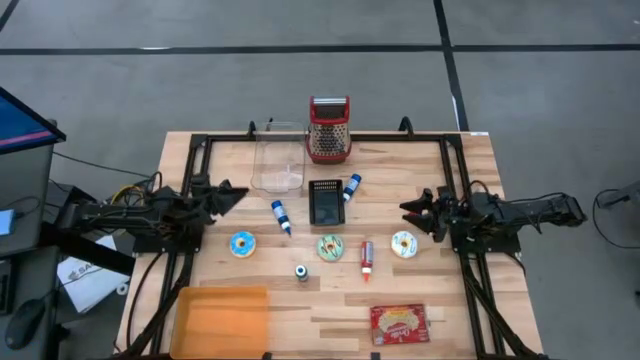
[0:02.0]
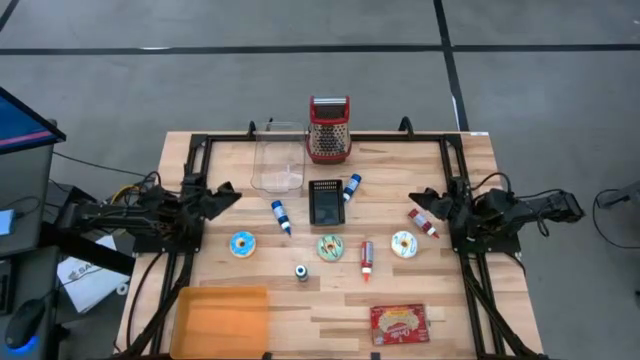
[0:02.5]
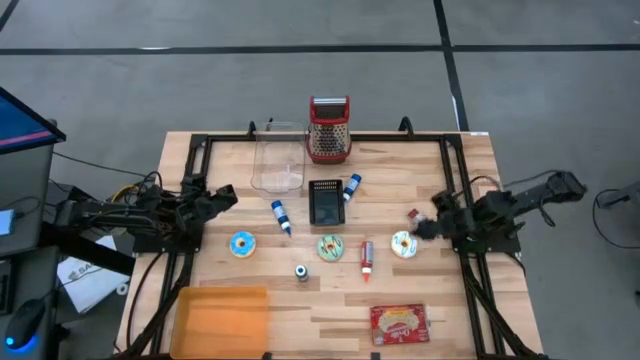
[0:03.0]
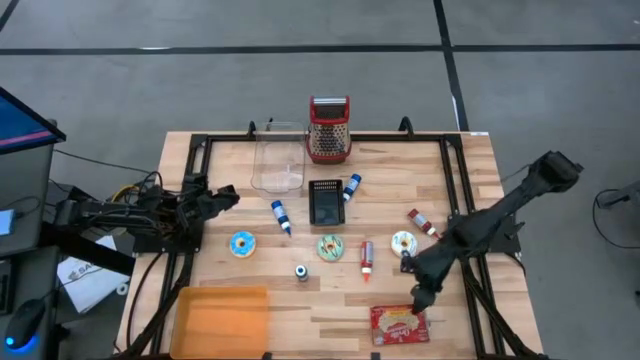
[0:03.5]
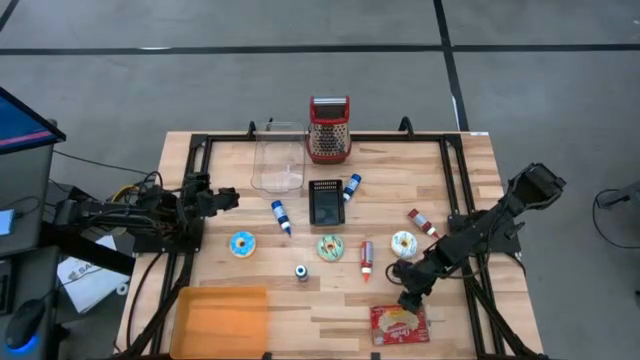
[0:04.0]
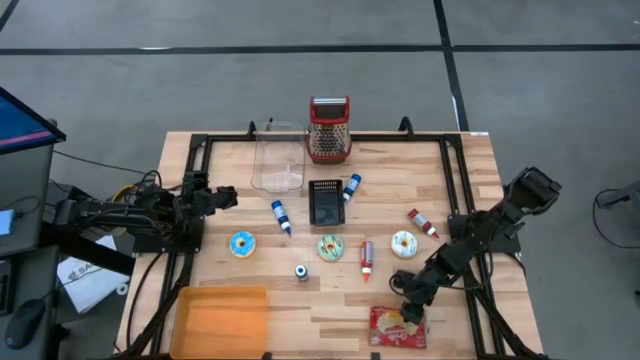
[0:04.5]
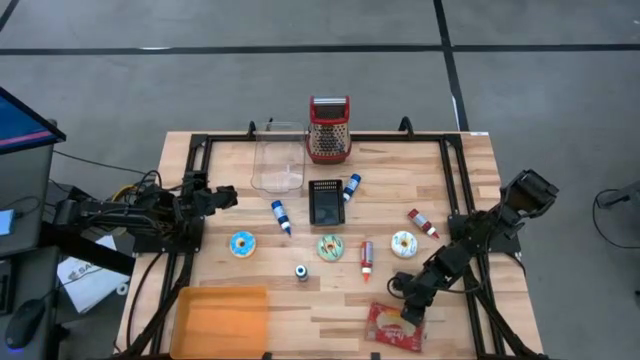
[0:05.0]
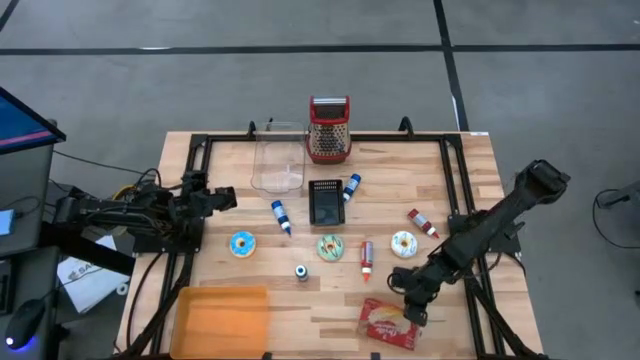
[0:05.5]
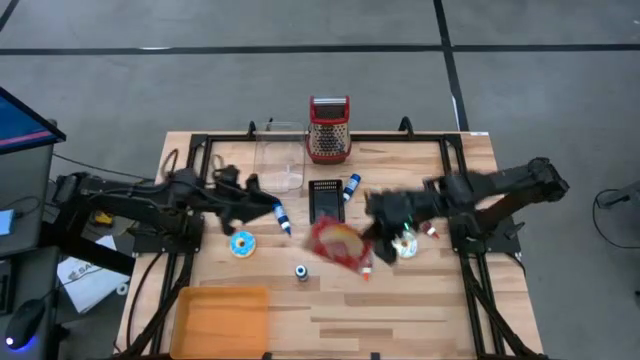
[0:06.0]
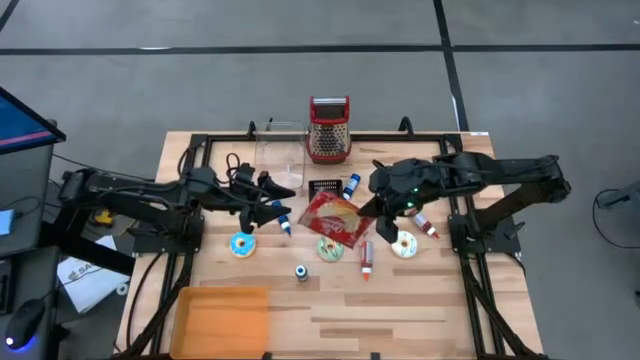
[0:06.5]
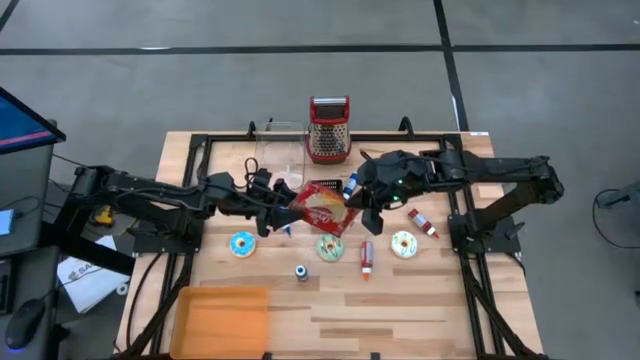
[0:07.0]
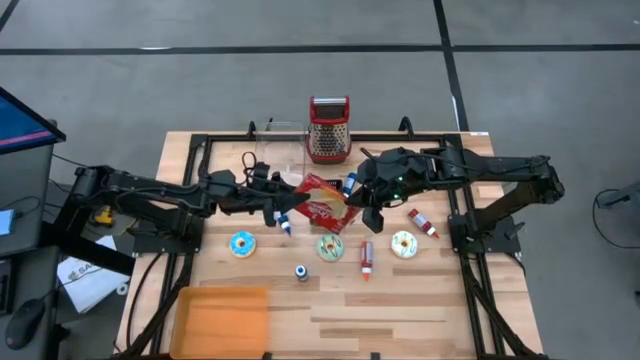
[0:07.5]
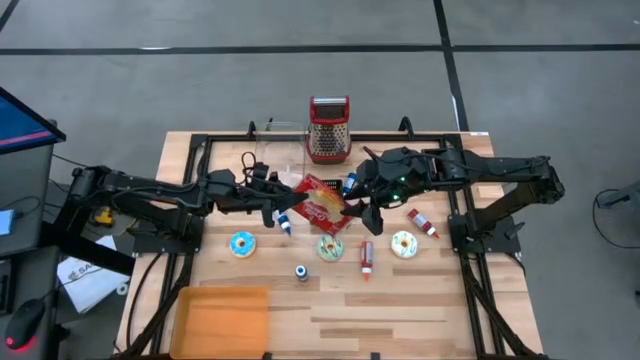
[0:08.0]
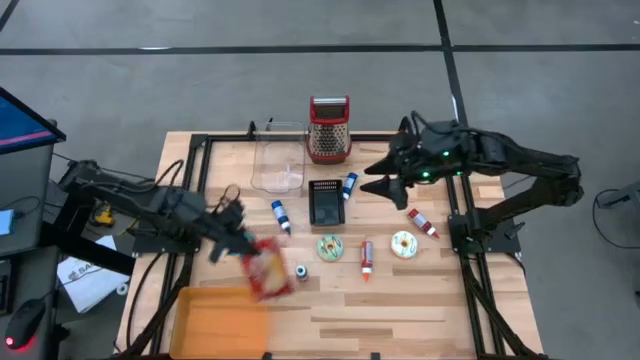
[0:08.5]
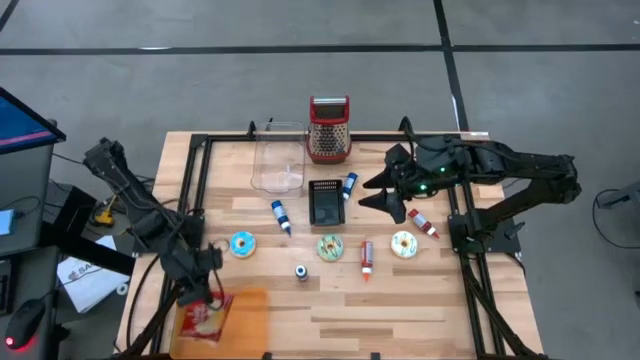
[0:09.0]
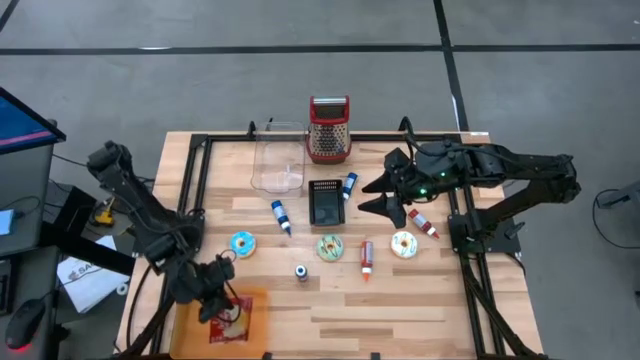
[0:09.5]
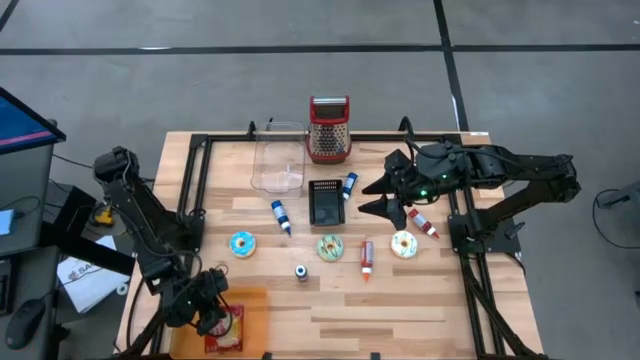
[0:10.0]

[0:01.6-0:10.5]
Put the popcorn bag into the orange bin

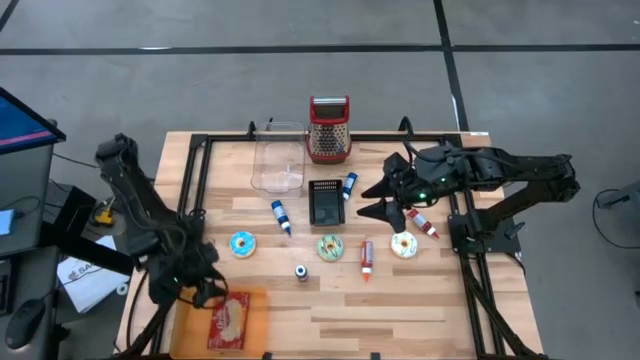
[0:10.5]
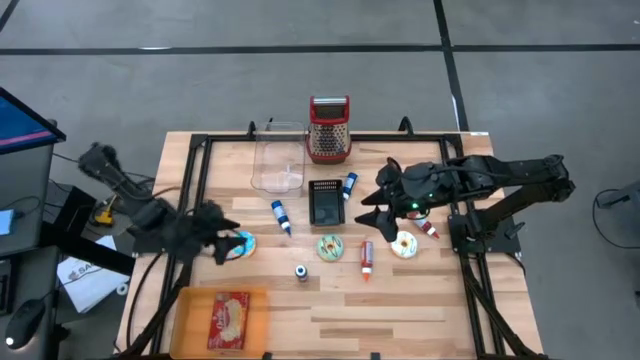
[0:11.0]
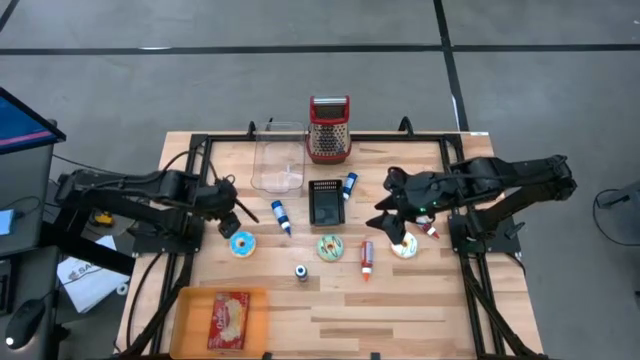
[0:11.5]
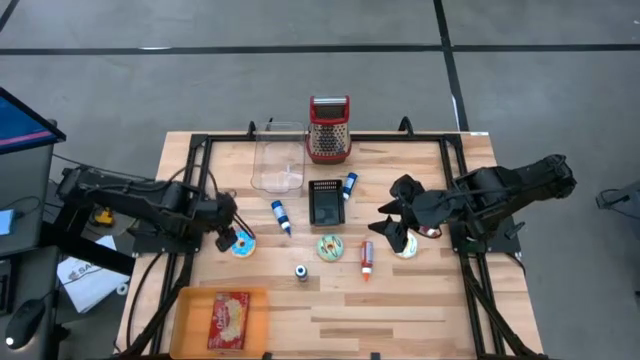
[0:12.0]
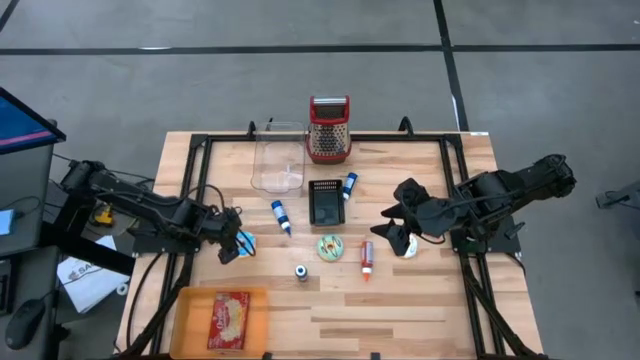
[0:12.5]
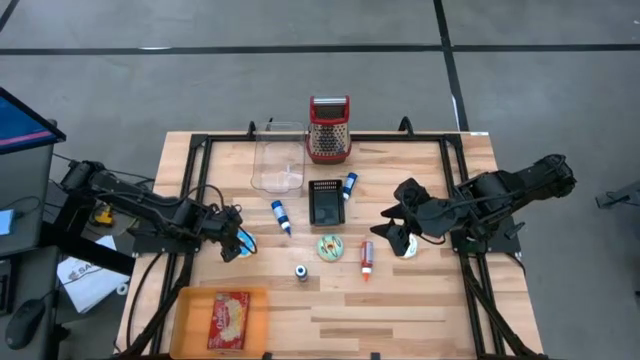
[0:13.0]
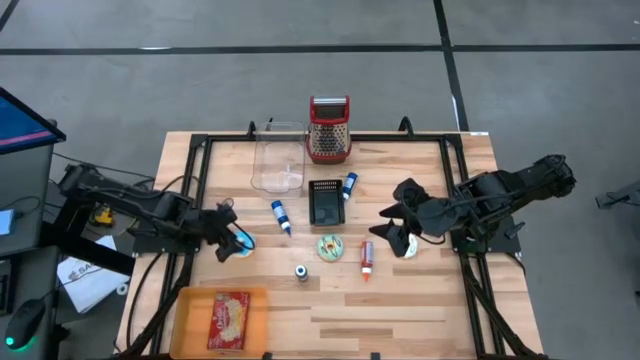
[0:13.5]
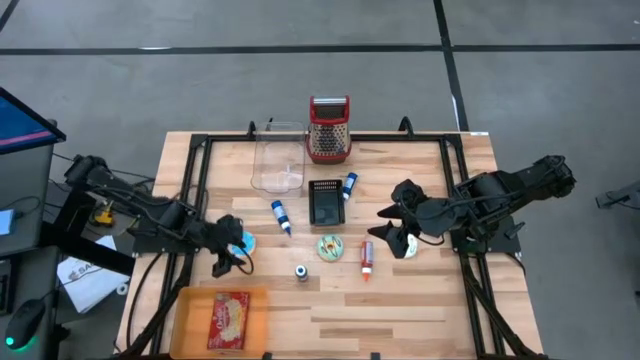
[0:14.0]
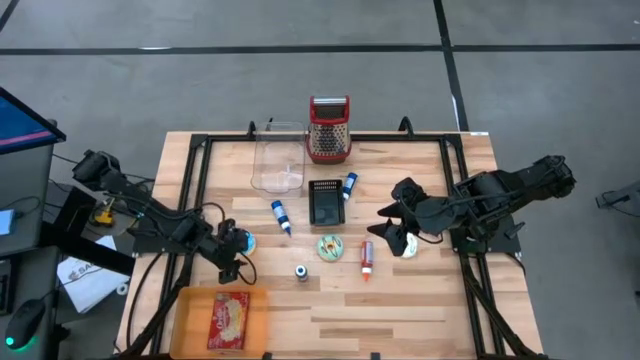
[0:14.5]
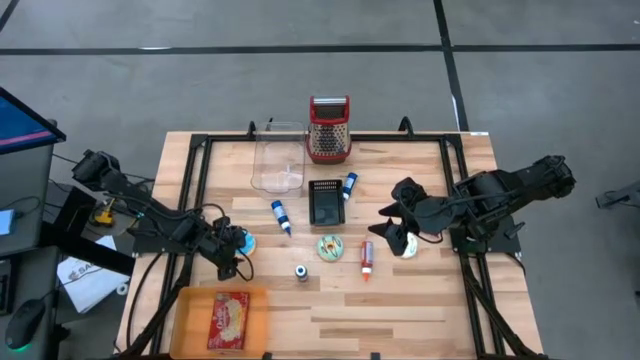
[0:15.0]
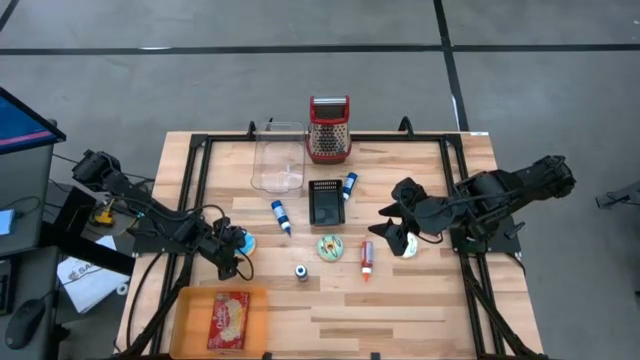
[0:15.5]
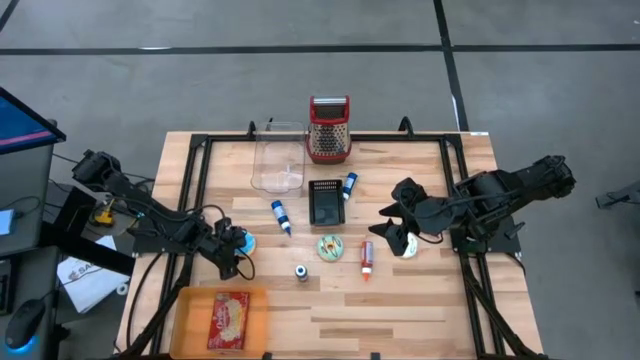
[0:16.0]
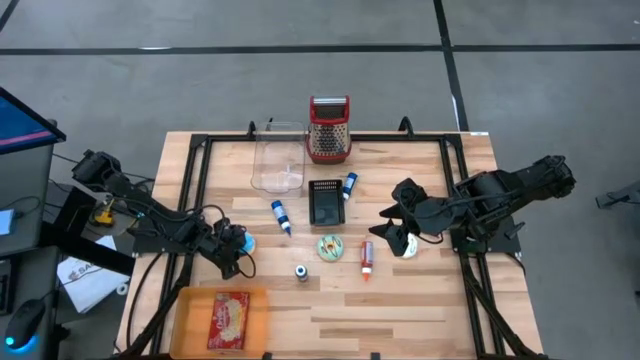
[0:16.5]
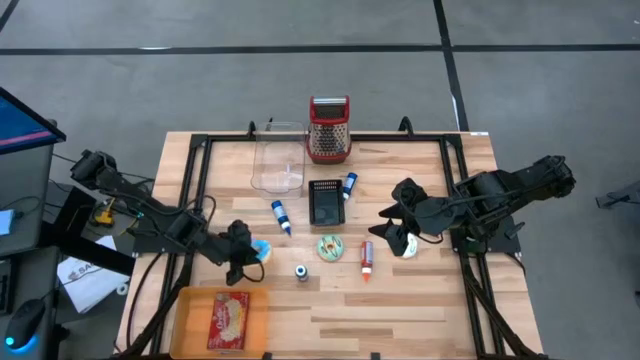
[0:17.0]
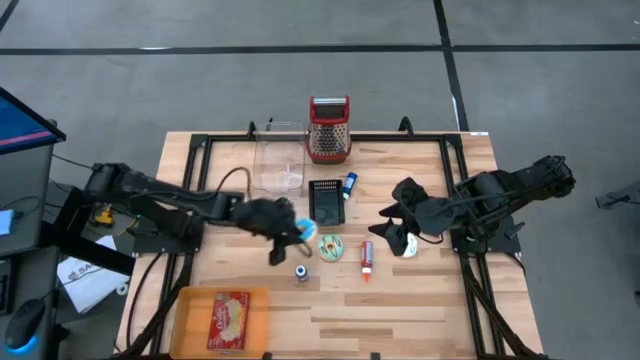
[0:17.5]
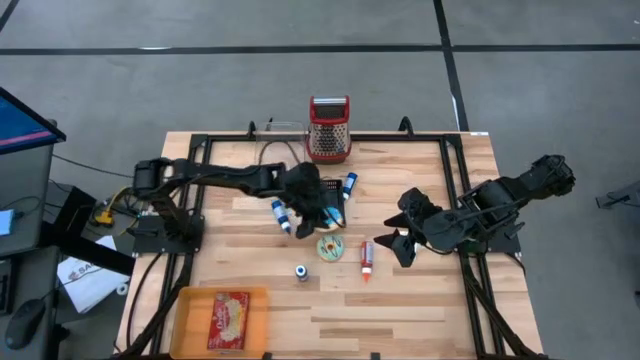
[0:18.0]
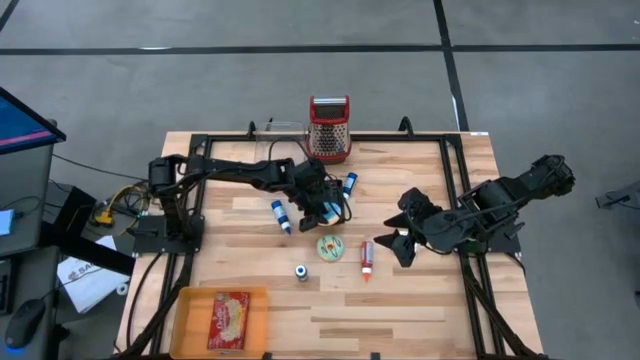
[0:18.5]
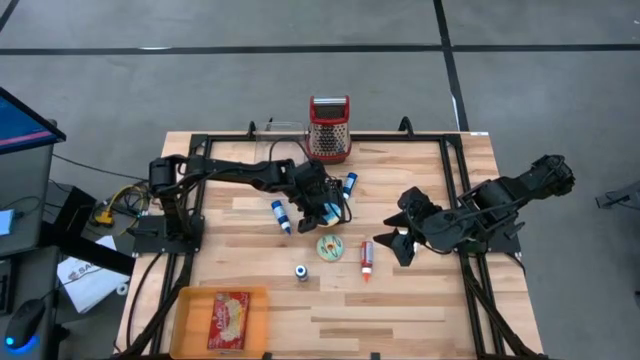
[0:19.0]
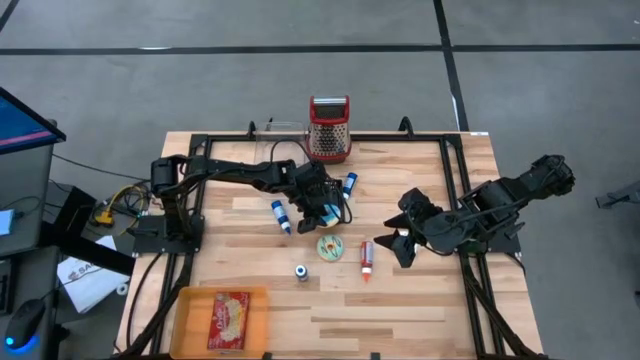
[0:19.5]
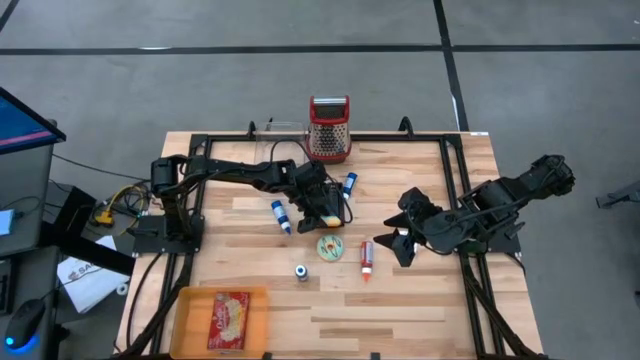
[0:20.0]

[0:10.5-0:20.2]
Put the blue donut into the black bin
